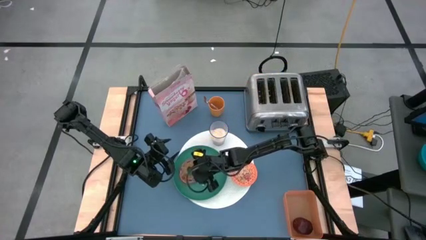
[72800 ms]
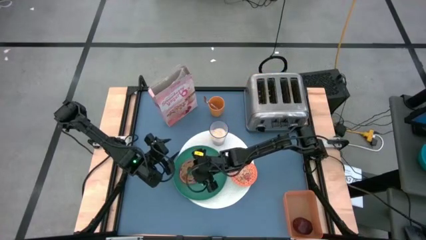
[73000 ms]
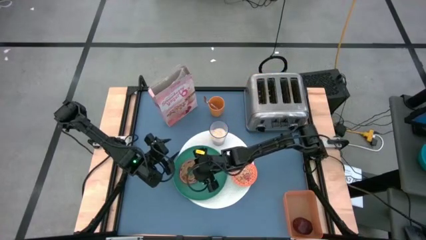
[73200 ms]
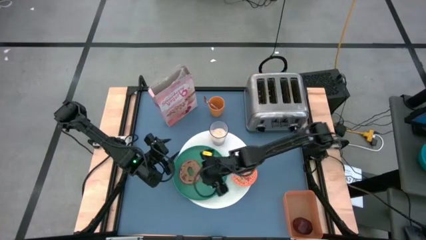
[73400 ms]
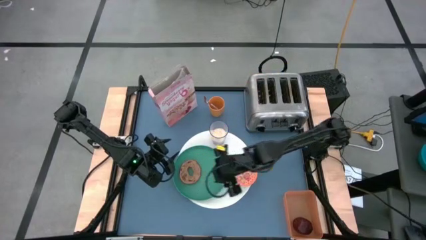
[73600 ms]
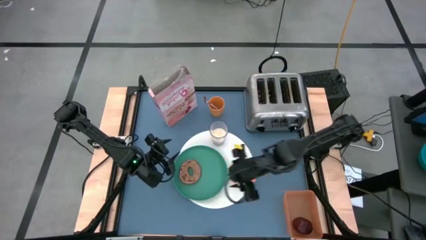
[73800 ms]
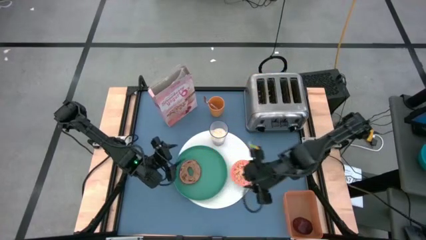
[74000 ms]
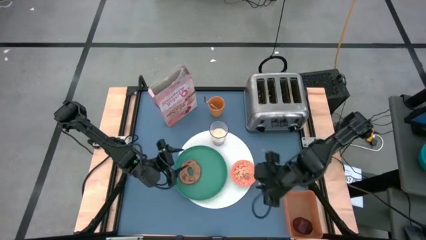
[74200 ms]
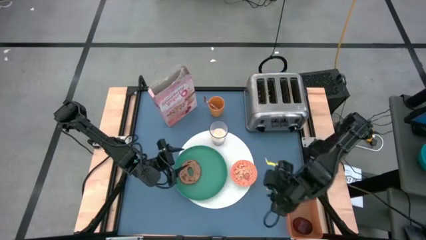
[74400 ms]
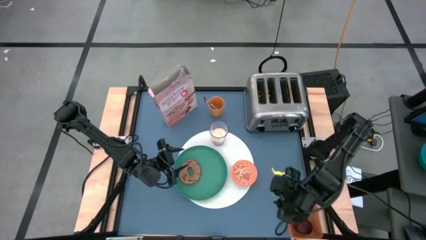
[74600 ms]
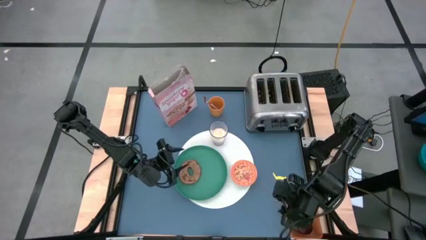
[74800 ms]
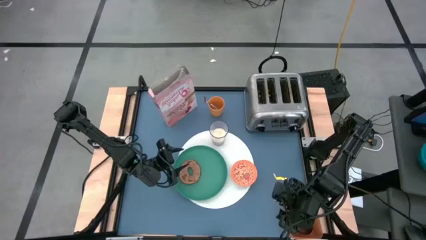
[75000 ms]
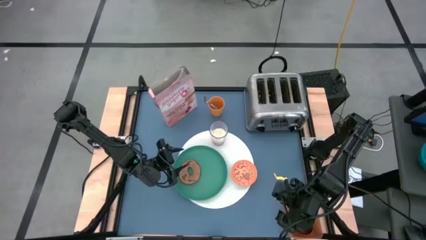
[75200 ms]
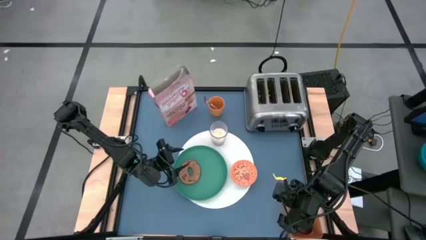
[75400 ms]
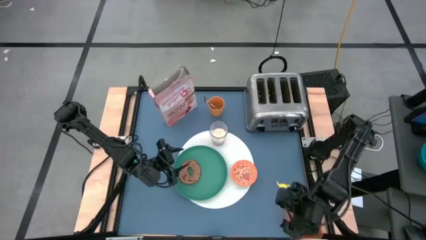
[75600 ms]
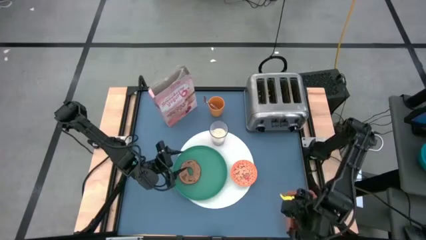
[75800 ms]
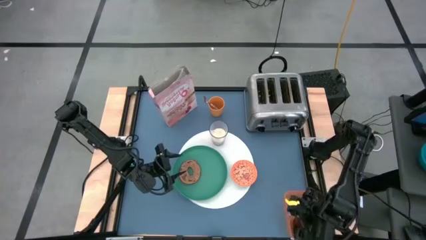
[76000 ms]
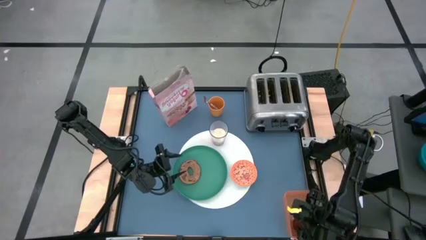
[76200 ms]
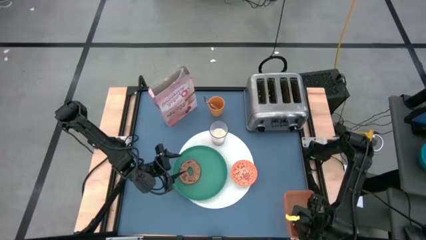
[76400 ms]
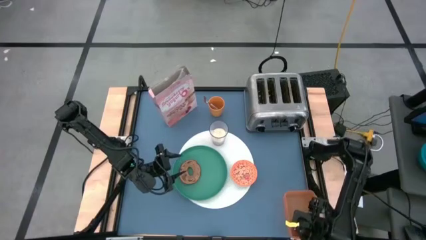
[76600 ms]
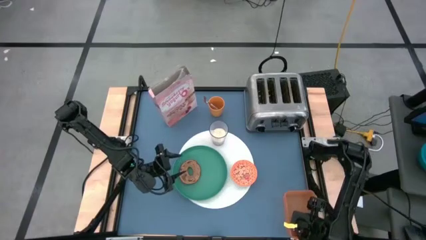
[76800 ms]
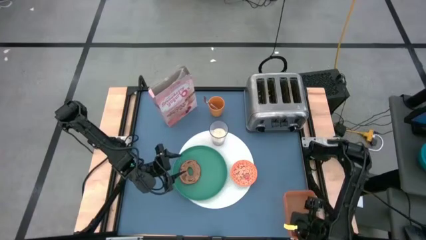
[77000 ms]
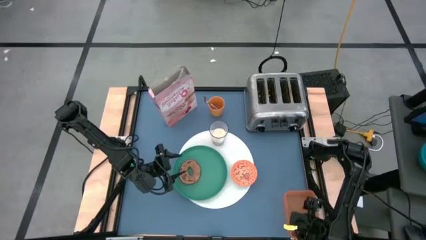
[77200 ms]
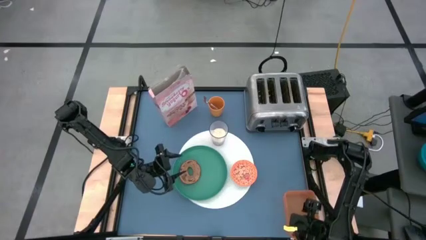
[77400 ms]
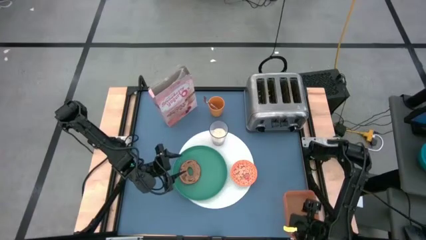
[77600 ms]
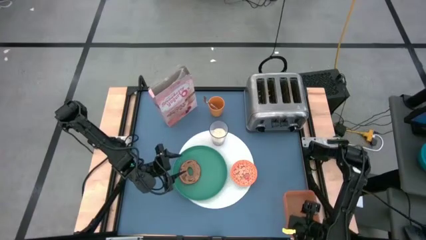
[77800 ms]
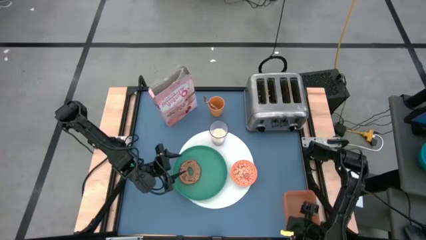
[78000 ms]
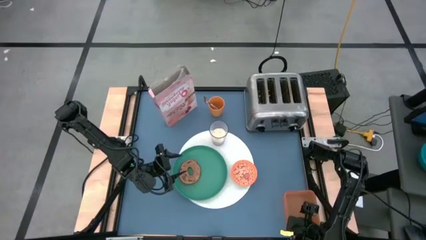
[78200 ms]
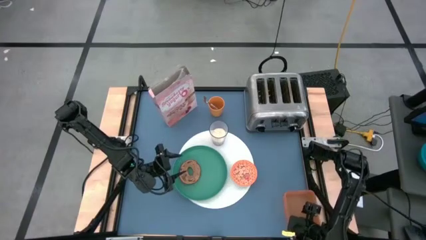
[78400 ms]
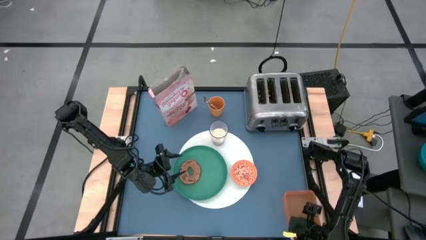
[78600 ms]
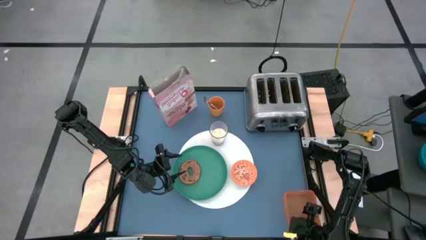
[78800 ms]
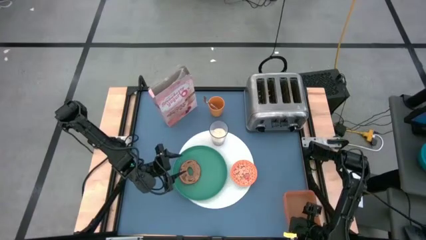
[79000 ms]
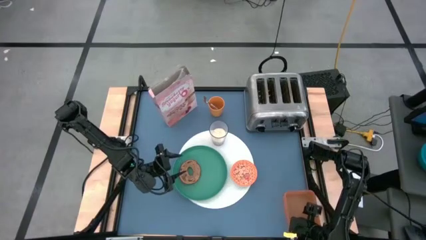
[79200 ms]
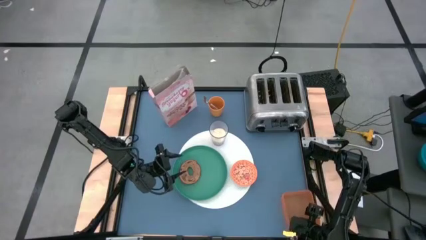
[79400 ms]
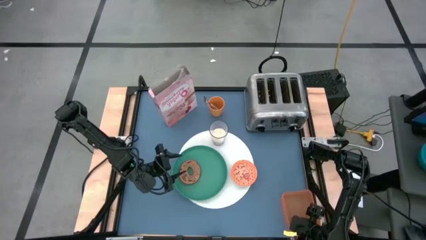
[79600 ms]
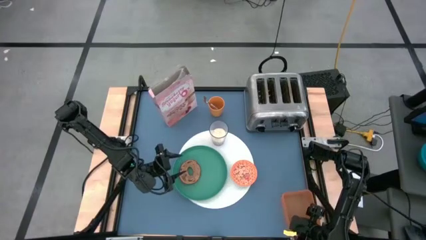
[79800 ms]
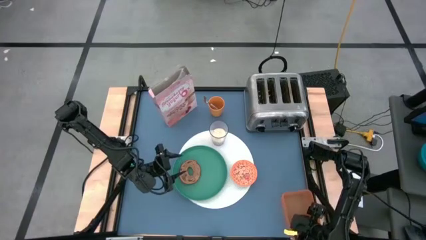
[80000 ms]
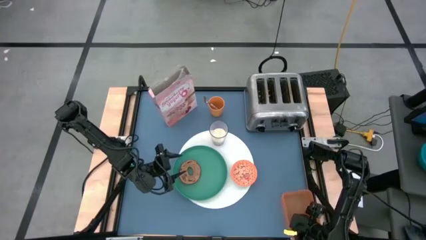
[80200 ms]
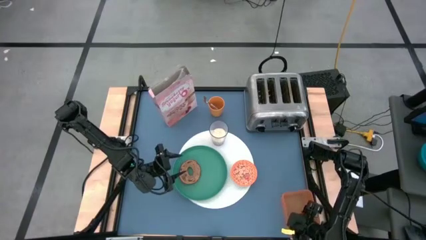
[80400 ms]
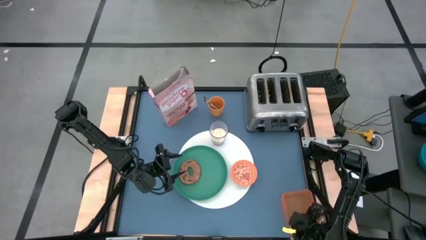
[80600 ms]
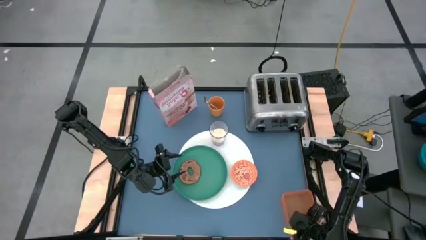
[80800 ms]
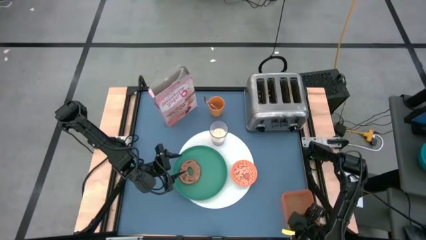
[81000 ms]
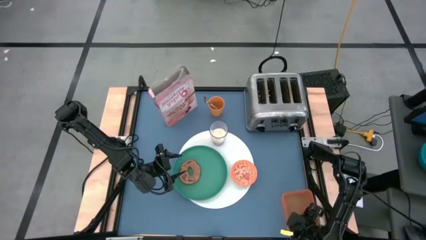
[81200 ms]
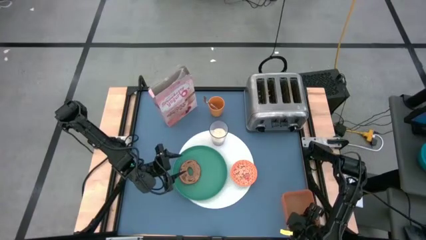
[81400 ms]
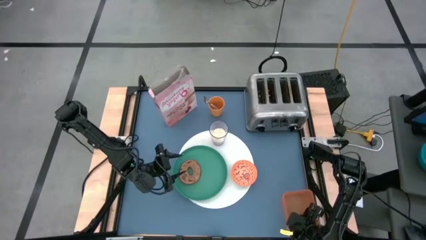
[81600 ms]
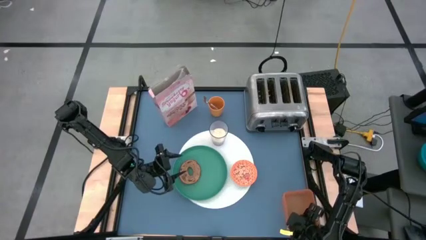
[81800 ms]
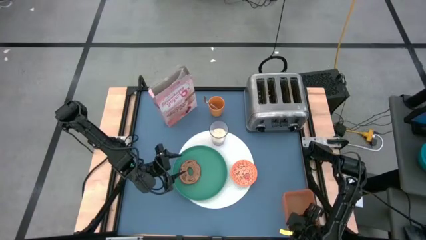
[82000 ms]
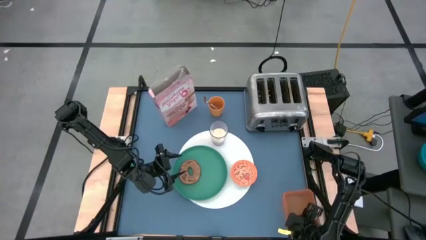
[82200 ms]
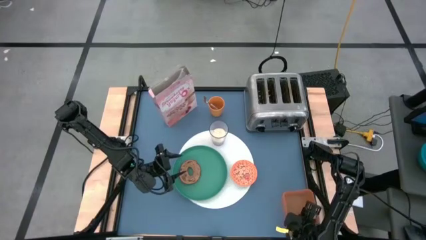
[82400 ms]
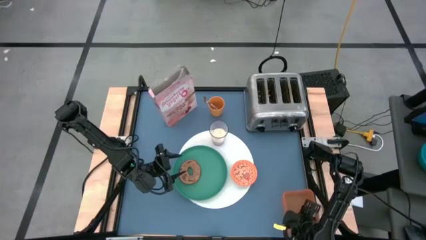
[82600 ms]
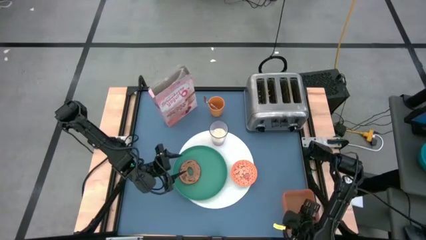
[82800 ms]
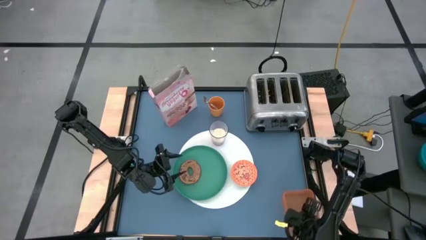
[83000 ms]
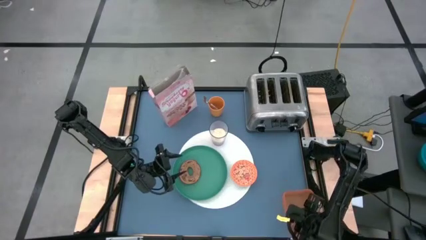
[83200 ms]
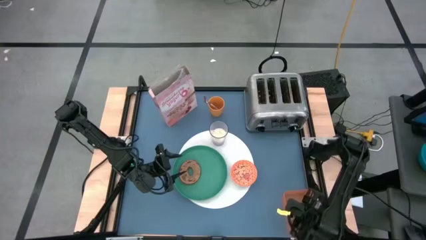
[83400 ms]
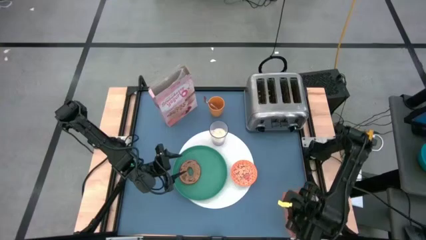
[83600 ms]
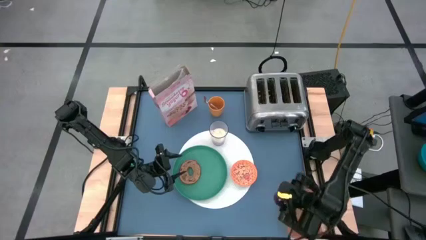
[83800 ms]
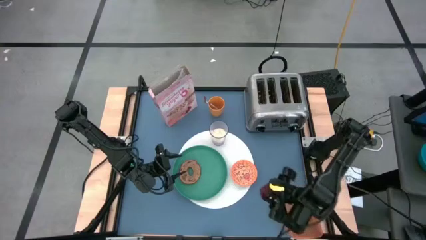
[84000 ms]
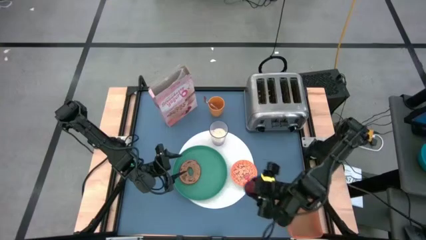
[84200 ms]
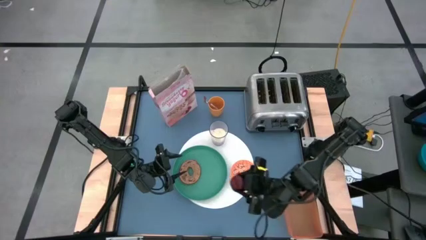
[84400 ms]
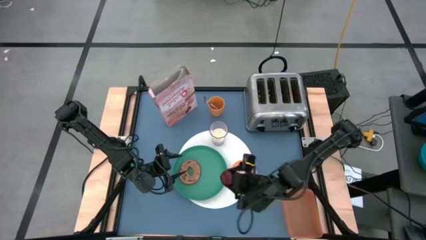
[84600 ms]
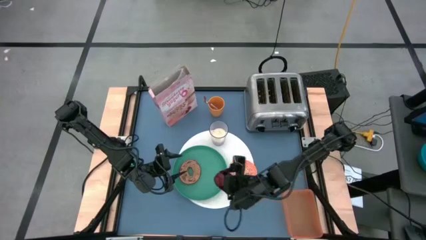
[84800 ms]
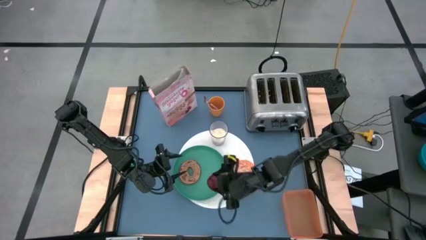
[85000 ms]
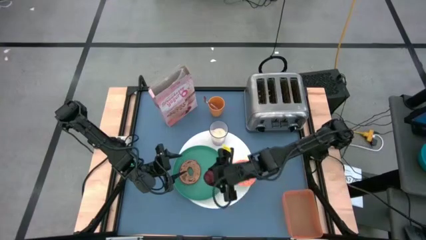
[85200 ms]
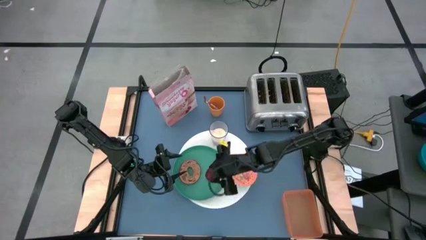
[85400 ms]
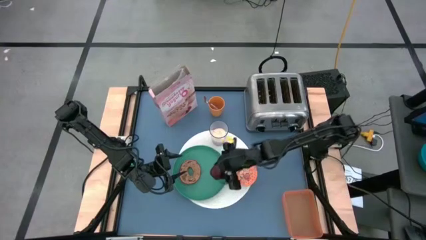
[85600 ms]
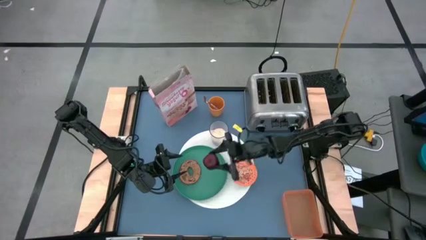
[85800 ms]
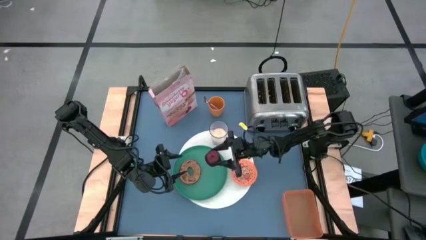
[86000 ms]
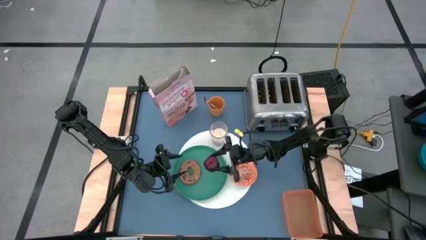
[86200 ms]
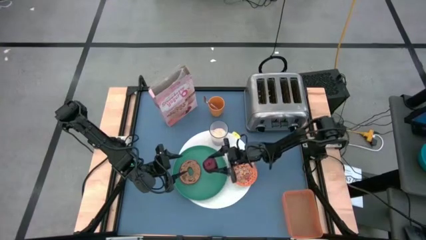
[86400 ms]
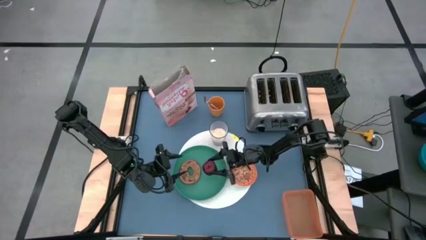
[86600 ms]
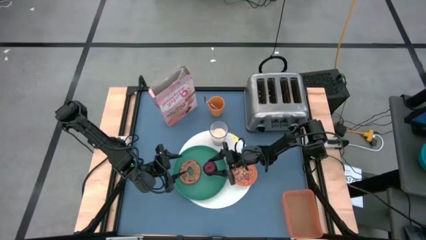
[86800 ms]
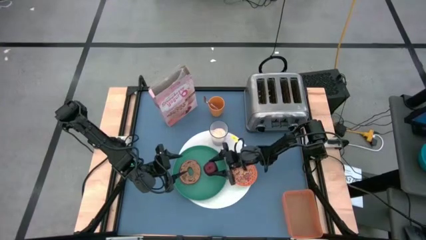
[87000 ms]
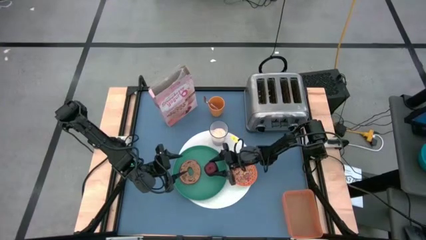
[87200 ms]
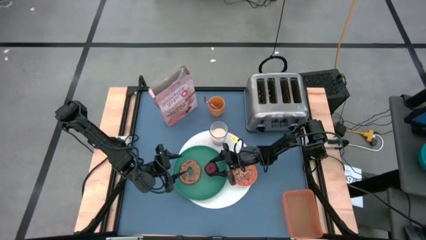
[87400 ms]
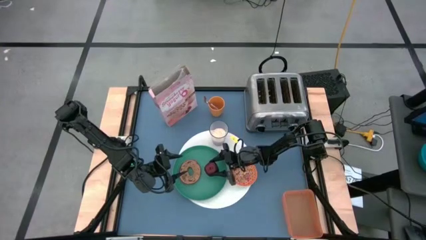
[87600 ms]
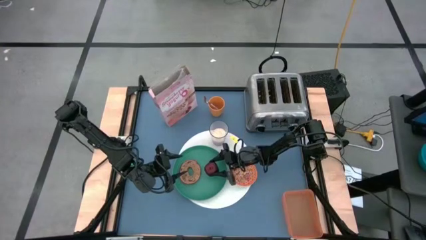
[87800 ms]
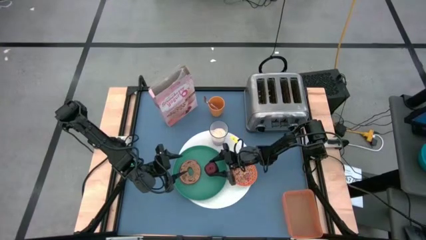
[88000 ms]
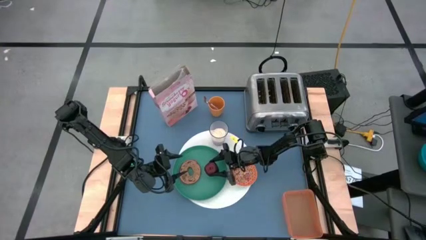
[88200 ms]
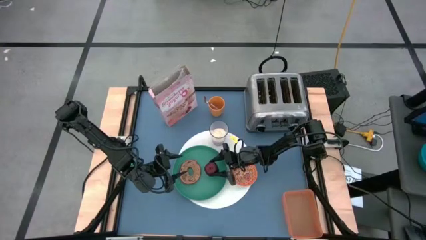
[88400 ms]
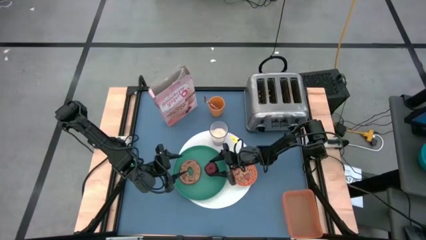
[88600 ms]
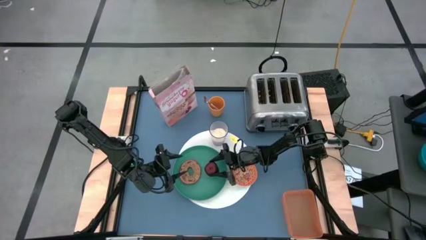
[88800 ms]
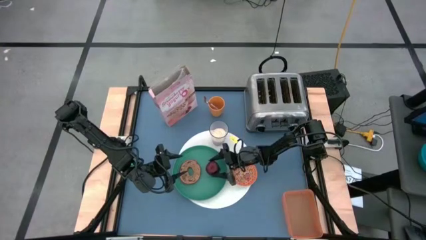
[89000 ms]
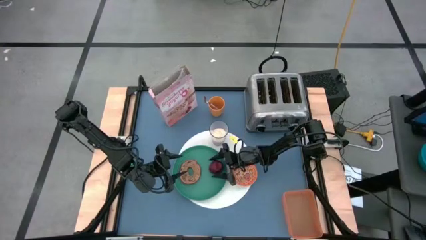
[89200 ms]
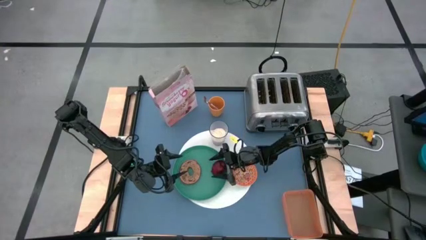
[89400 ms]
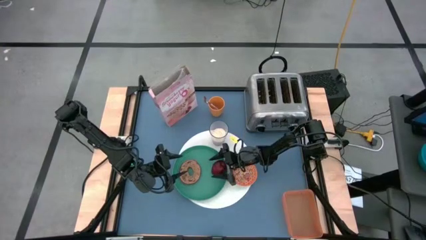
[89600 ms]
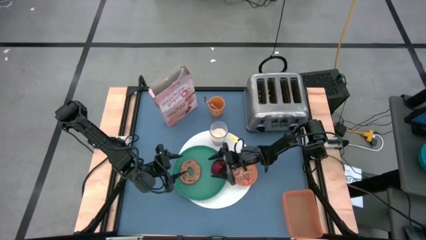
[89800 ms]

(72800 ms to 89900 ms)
Task: Arrange a breakfast setting
Put the apple on the green plate
